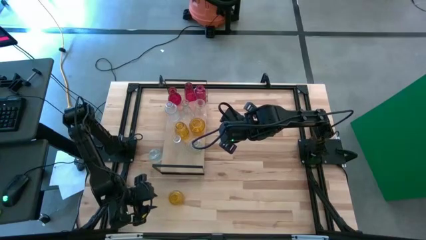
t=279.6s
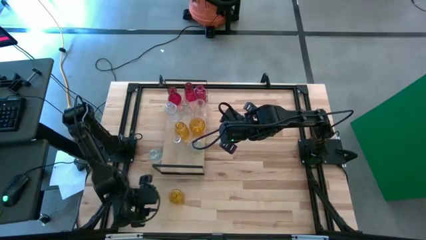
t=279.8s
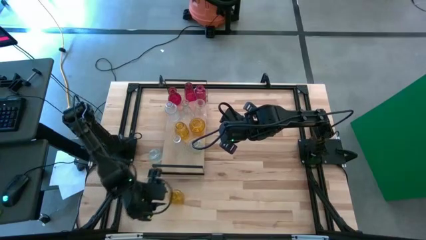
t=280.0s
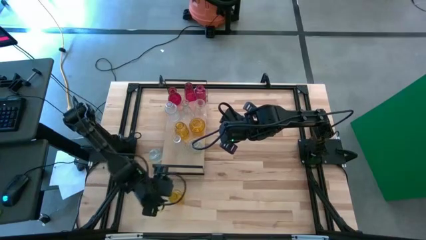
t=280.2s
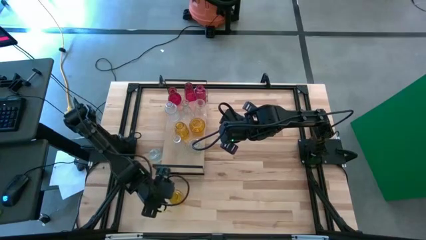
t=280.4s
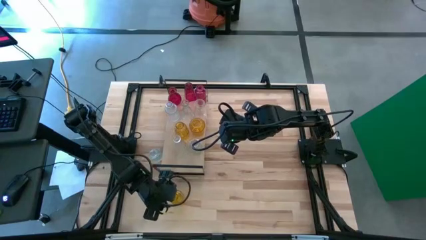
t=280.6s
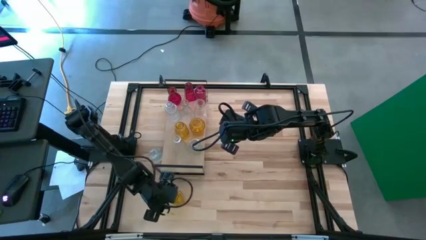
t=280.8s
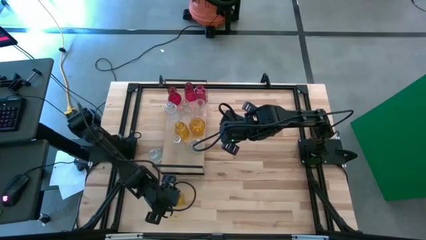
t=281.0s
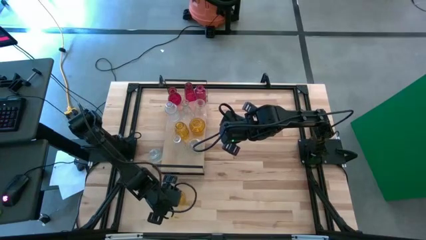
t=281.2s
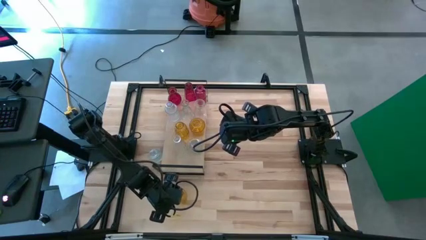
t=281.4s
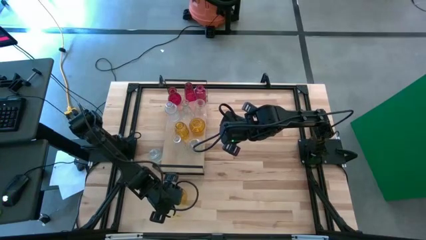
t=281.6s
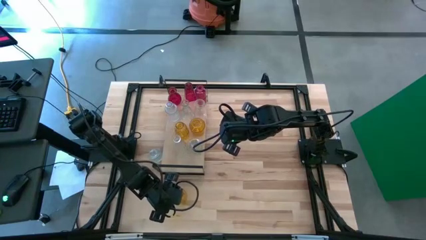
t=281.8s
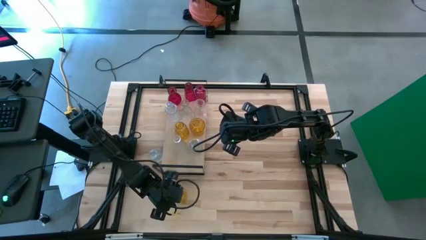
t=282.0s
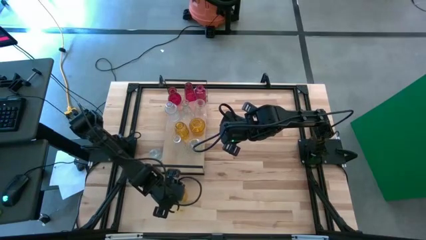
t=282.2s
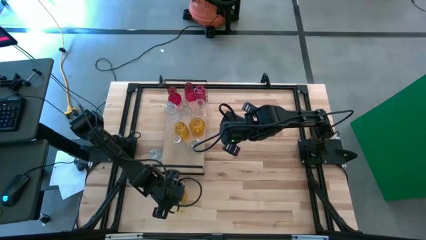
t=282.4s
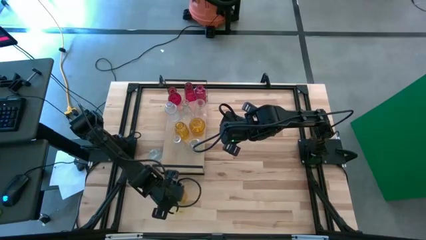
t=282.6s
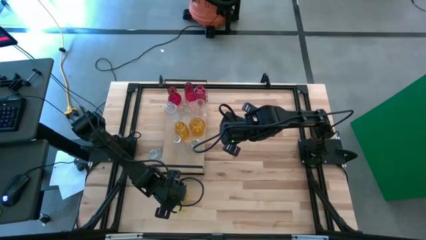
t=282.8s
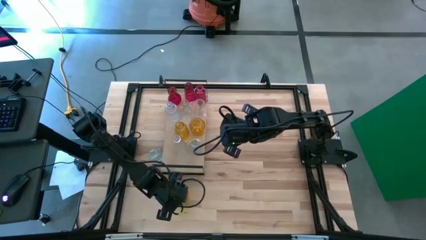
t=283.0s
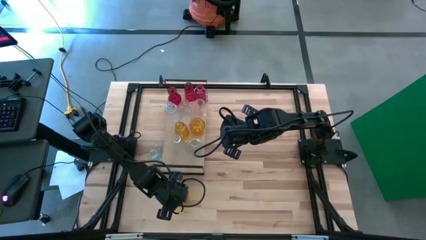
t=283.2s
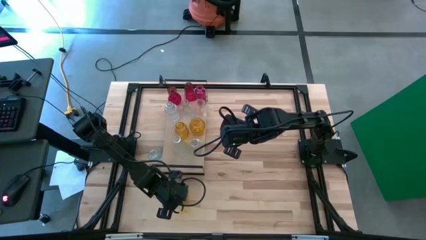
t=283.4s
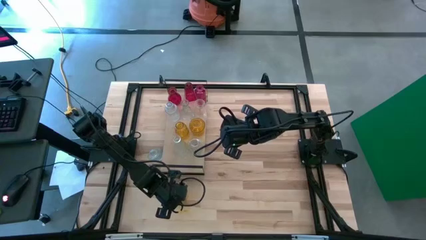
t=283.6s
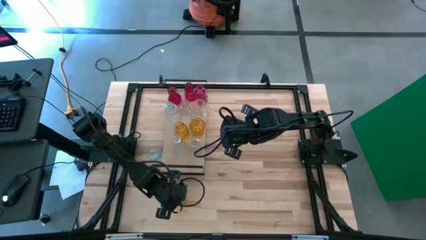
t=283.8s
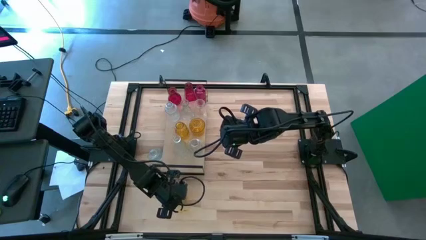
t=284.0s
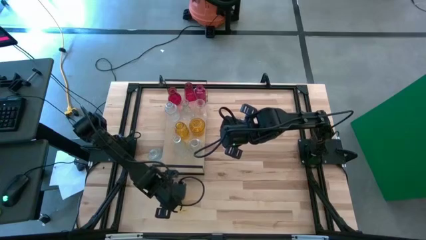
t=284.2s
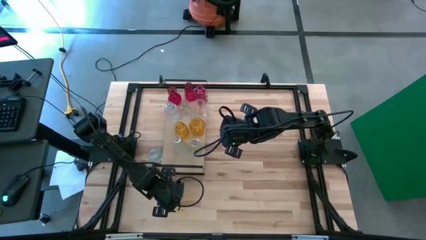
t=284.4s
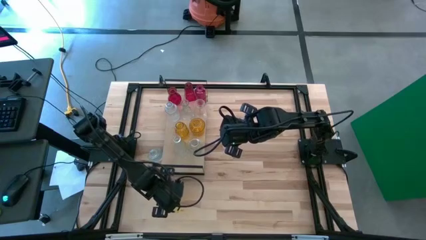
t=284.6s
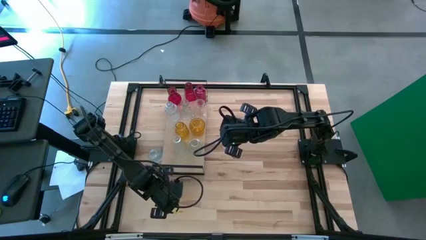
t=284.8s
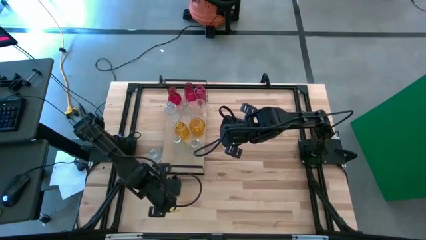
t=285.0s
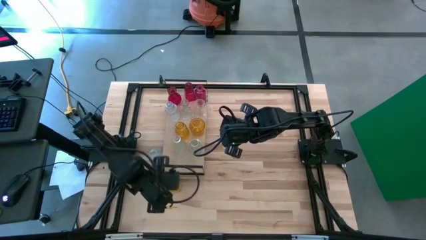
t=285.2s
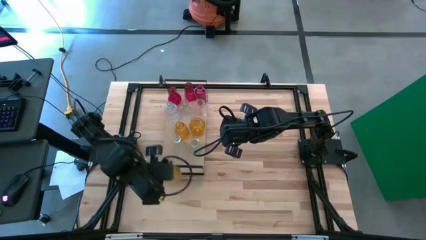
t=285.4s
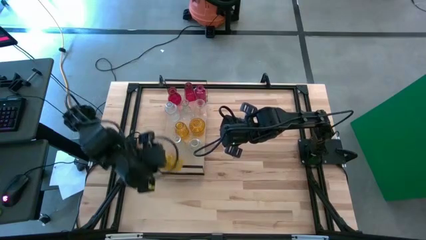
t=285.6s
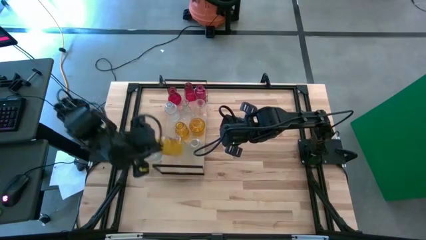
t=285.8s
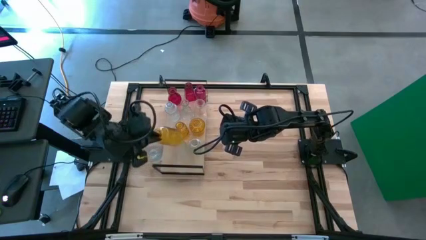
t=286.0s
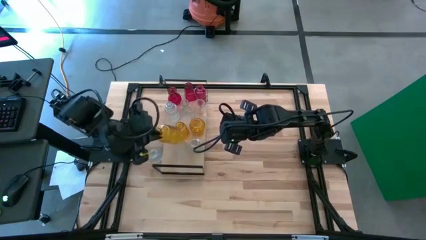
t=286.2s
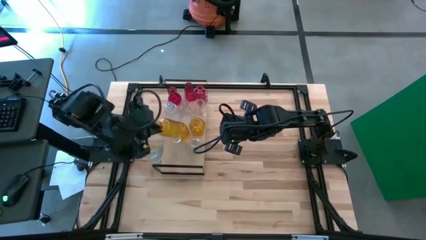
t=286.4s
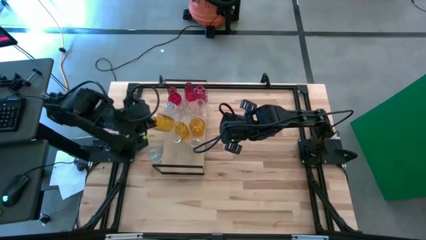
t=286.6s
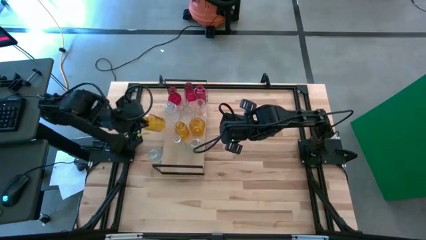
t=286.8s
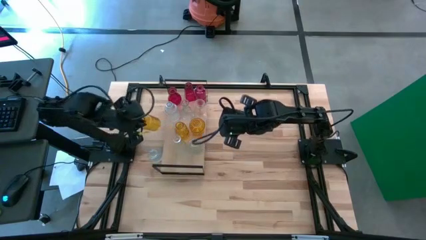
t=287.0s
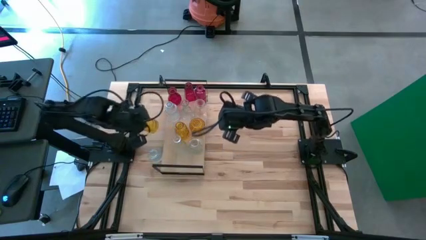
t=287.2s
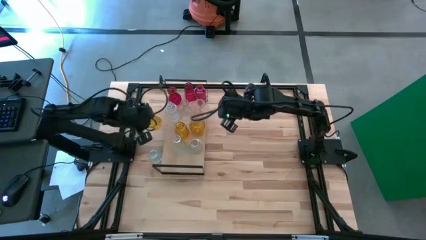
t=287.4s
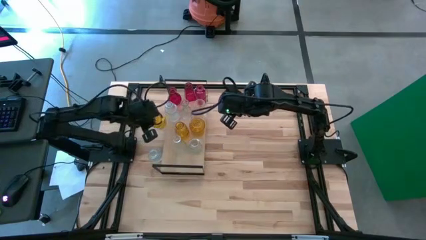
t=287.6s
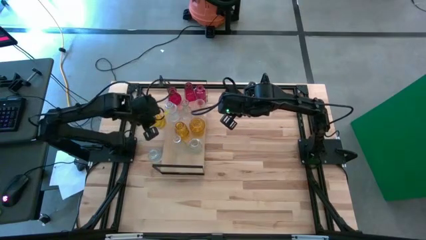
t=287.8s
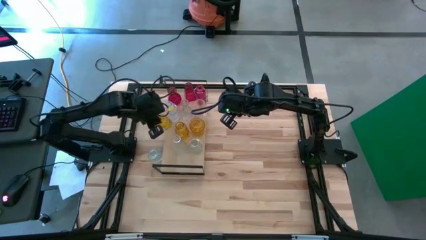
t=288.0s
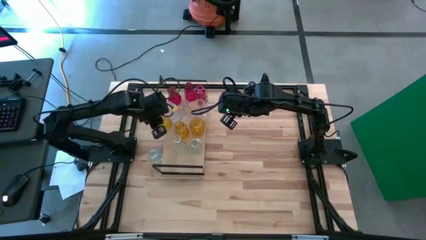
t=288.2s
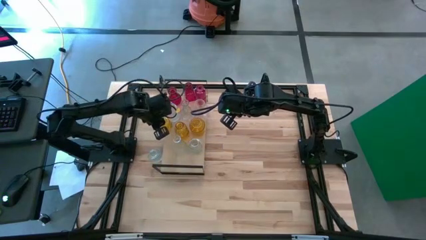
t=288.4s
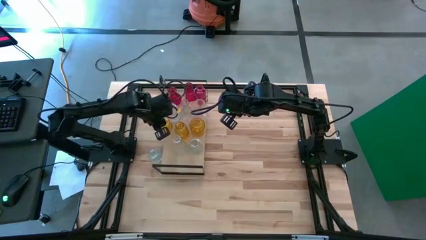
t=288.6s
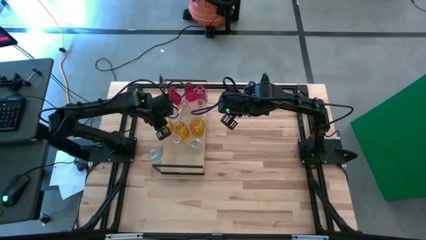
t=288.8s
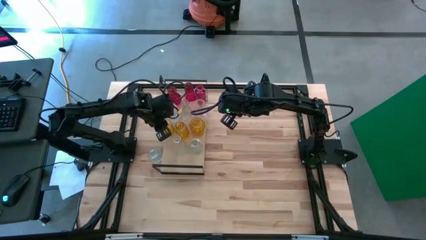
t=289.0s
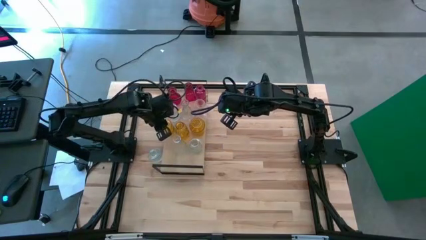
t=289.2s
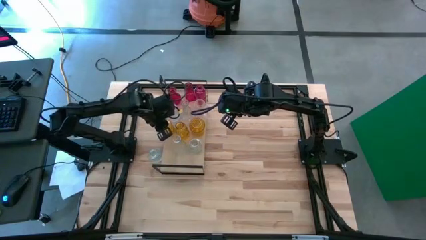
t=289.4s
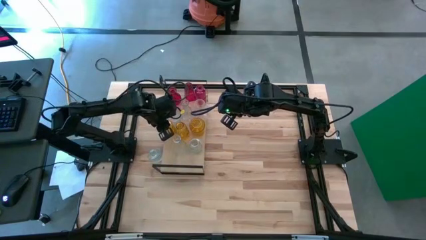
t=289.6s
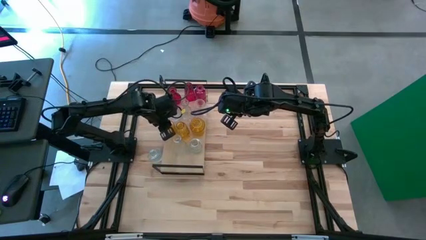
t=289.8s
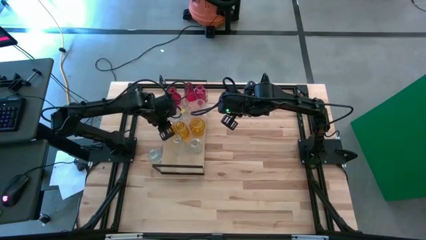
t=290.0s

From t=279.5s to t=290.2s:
Task: sort vases onto shelf
Put the yellow vase on the shelf aligned with the other yellow vase

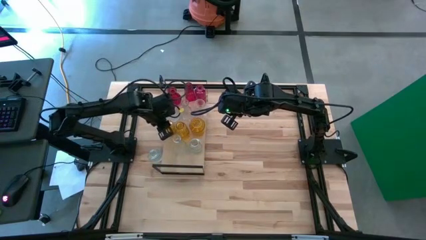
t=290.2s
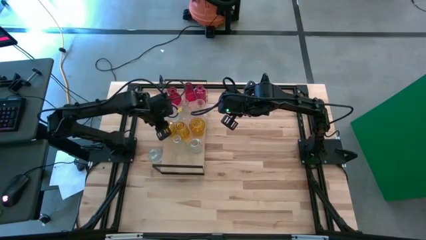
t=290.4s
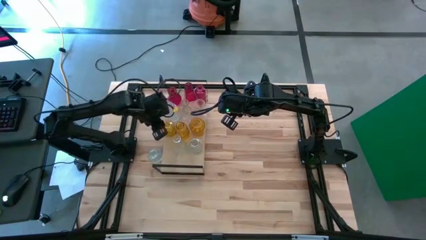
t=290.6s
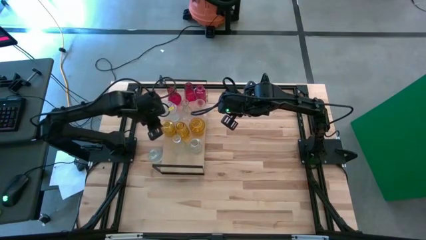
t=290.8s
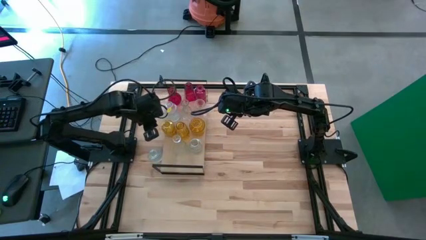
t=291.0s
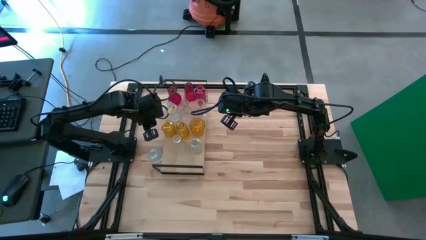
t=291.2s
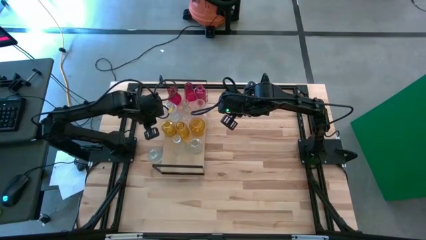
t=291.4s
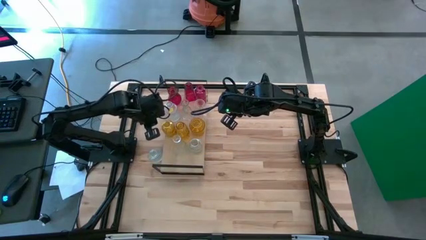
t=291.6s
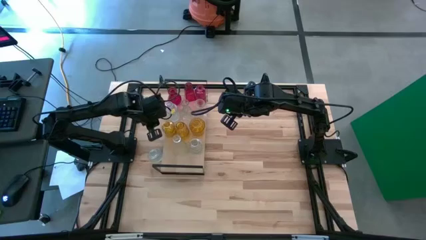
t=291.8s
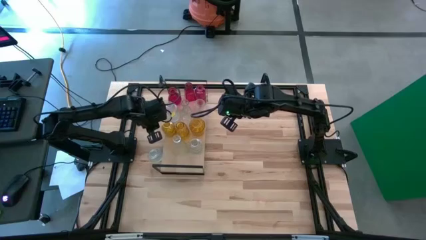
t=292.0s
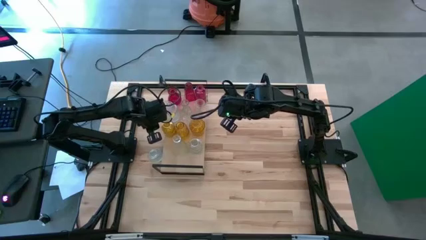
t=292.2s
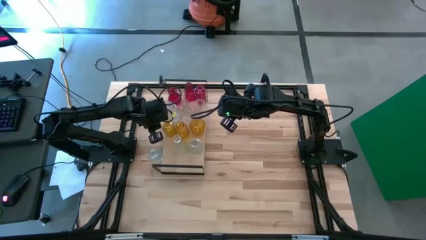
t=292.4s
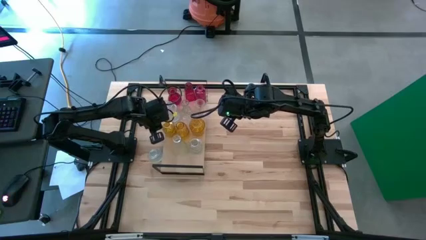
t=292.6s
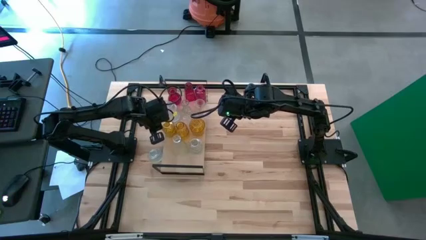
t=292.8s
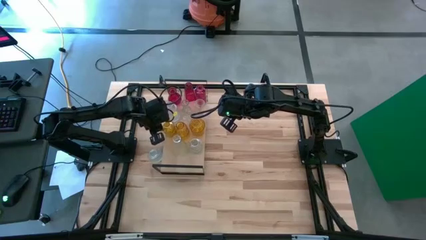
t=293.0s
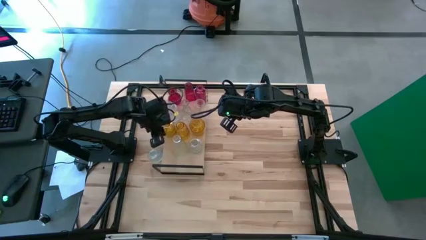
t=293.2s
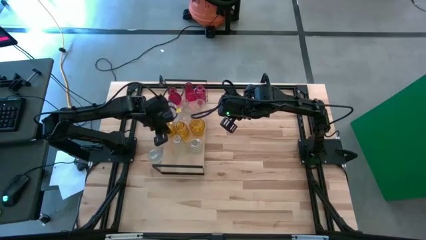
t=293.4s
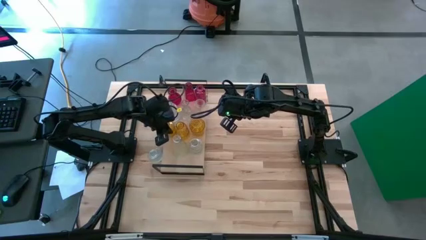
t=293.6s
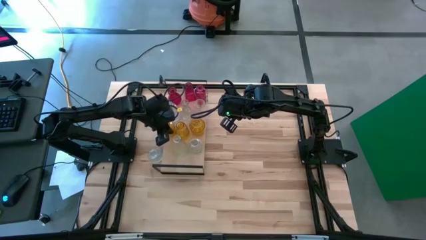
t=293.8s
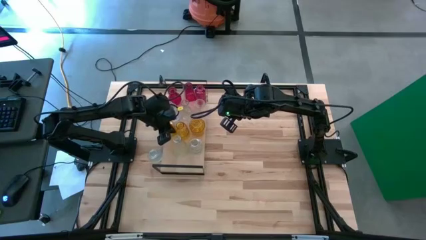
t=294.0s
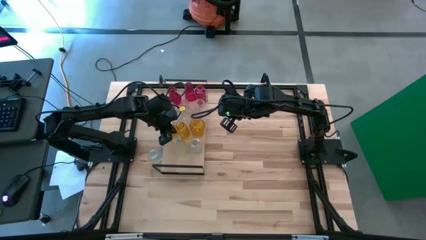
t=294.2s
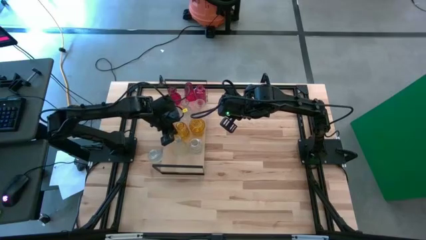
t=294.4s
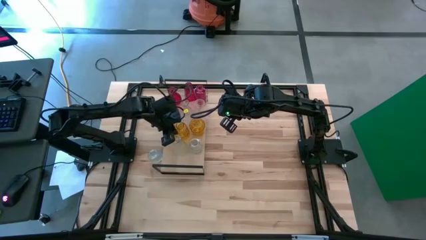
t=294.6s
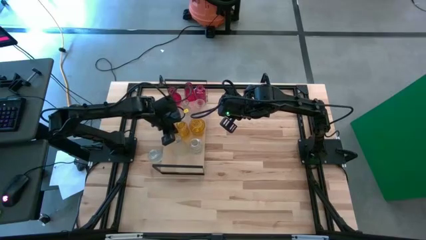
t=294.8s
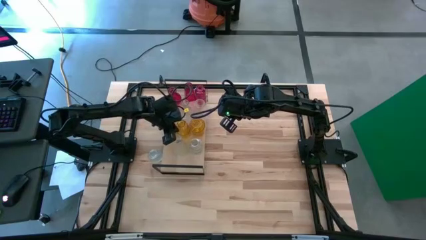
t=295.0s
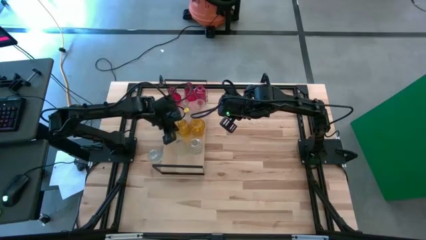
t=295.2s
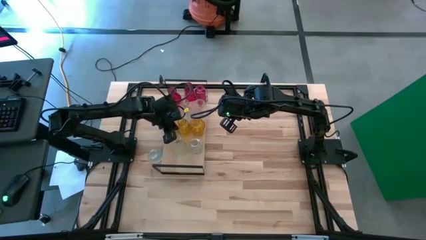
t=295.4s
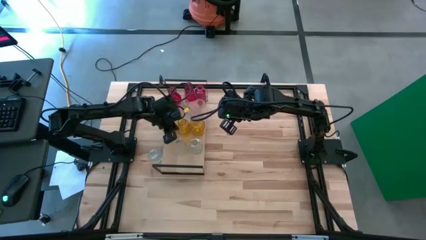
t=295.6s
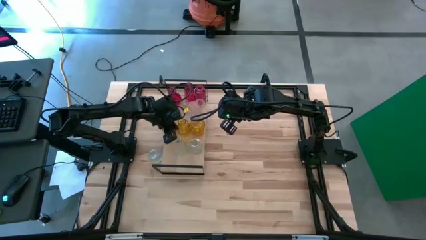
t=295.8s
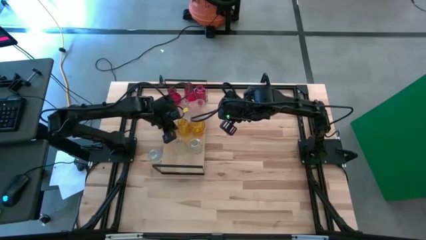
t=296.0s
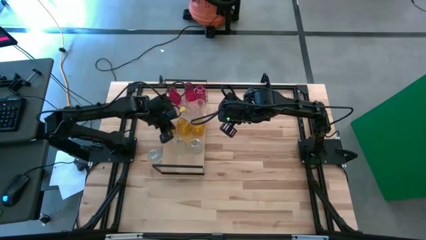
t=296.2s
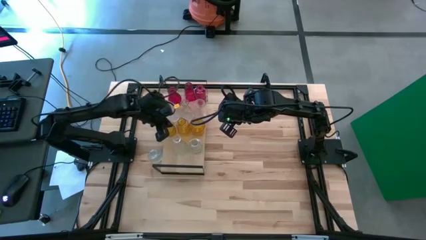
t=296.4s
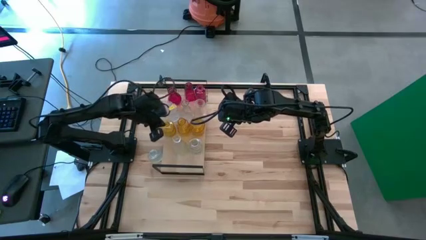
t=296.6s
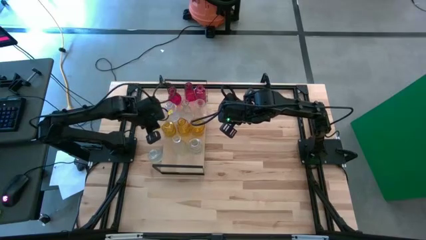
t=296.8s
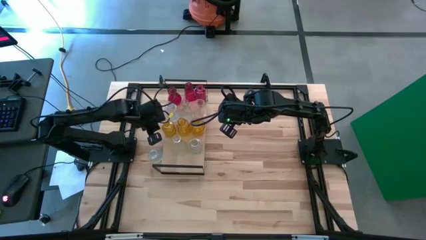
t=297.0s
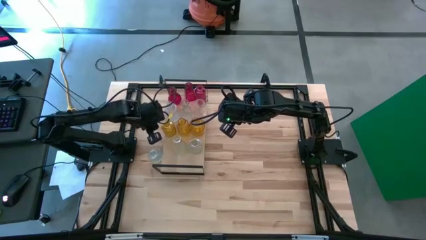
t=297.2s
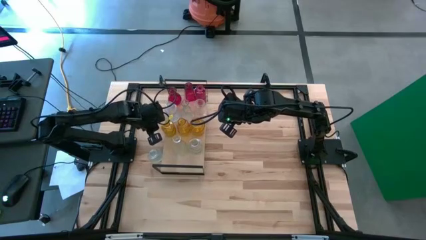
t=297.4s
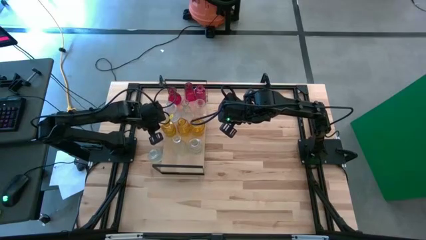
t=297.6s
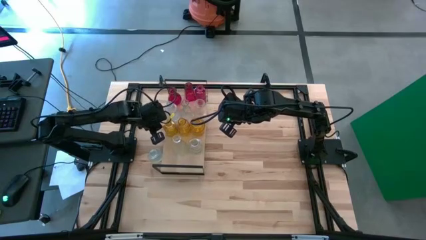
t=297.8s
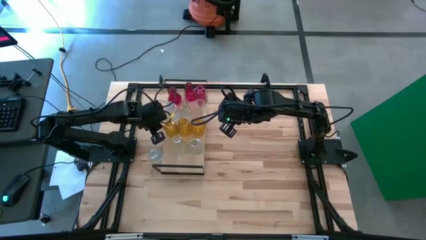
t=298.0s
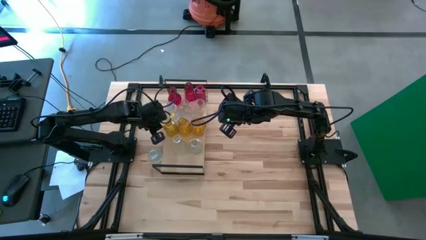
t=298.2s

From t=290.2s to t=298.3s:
Adjust the yellow vases on the shelf
